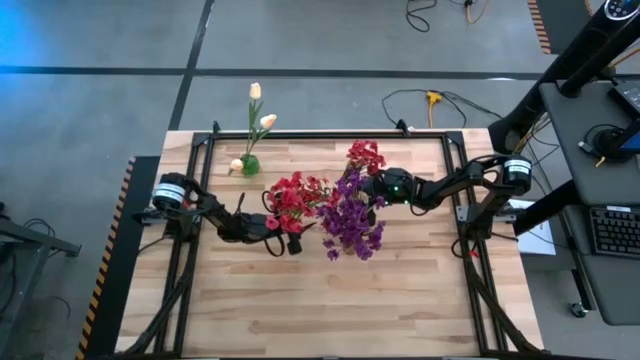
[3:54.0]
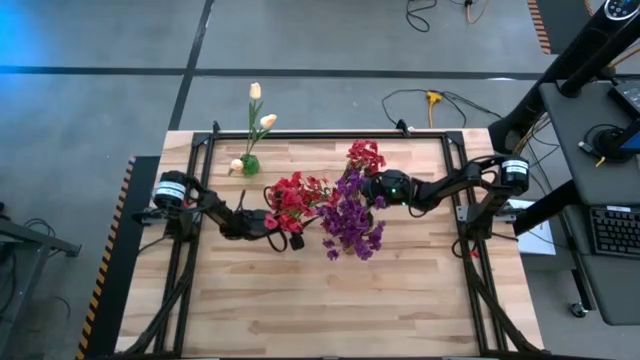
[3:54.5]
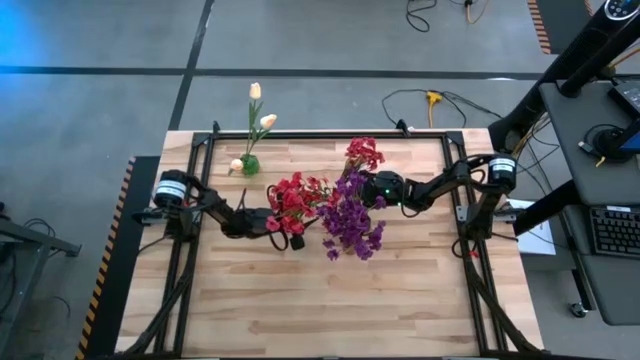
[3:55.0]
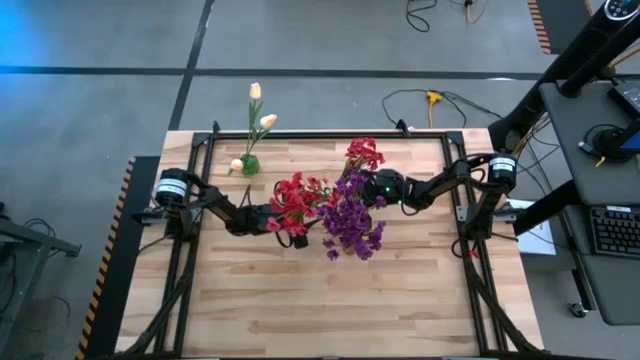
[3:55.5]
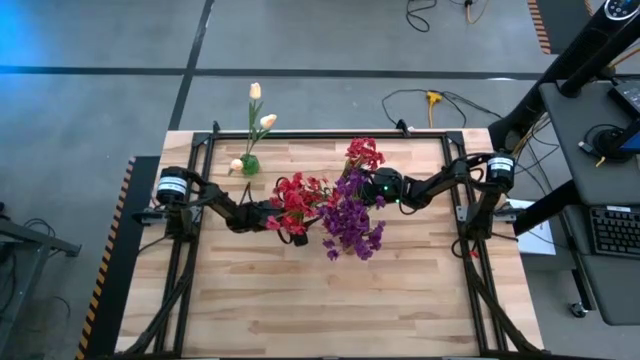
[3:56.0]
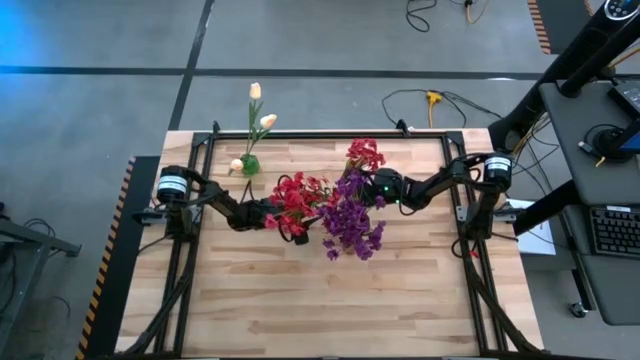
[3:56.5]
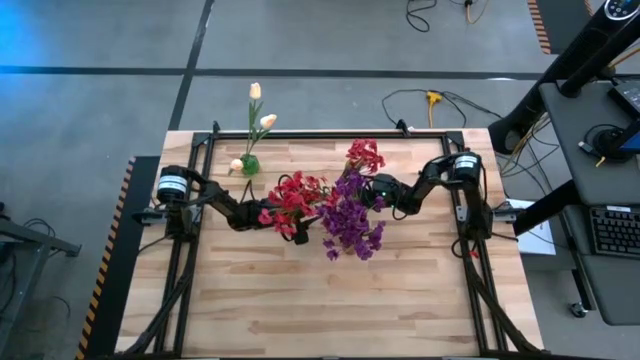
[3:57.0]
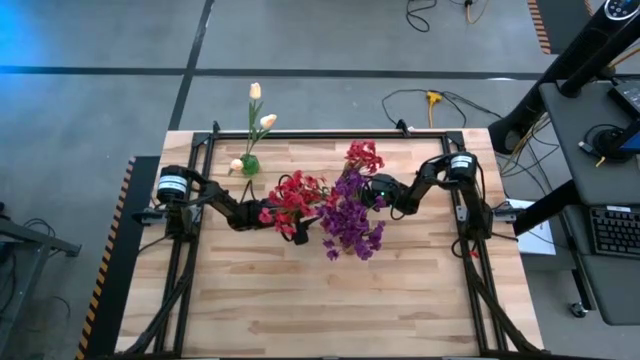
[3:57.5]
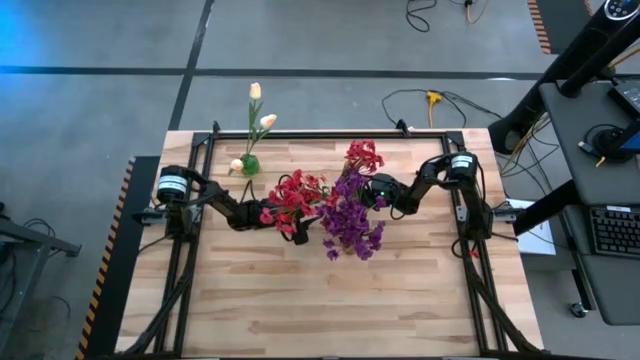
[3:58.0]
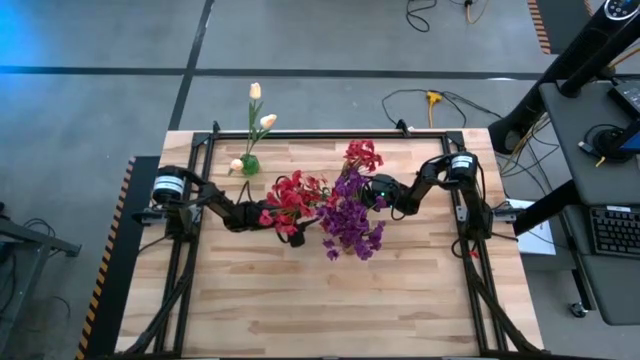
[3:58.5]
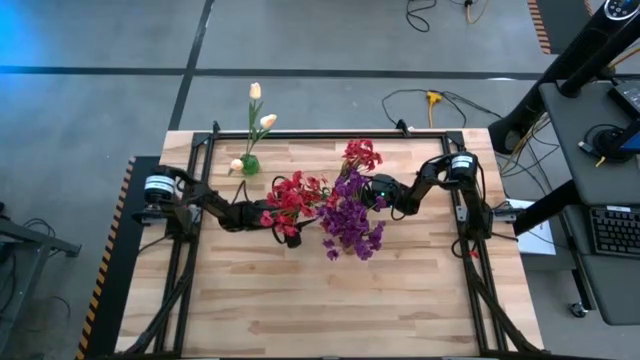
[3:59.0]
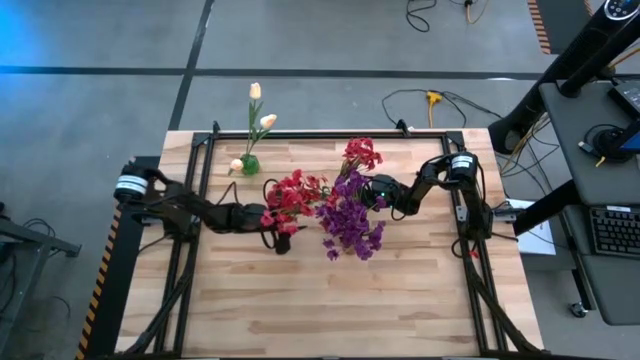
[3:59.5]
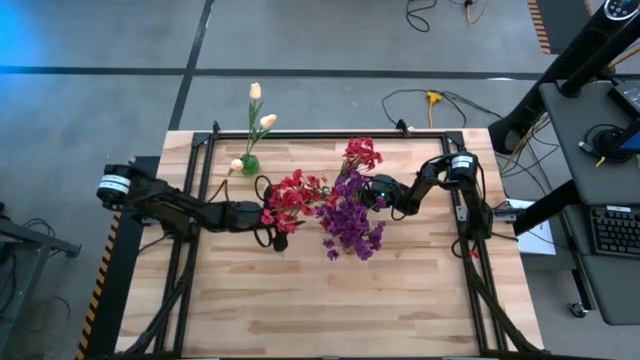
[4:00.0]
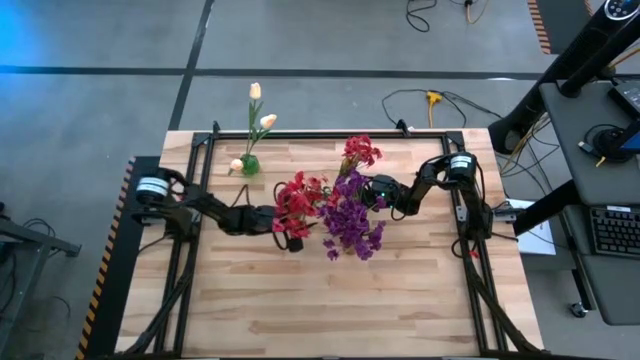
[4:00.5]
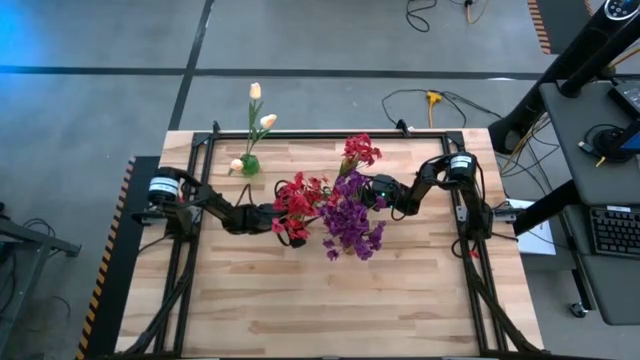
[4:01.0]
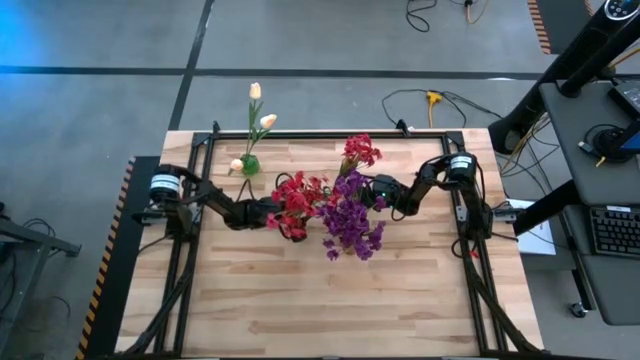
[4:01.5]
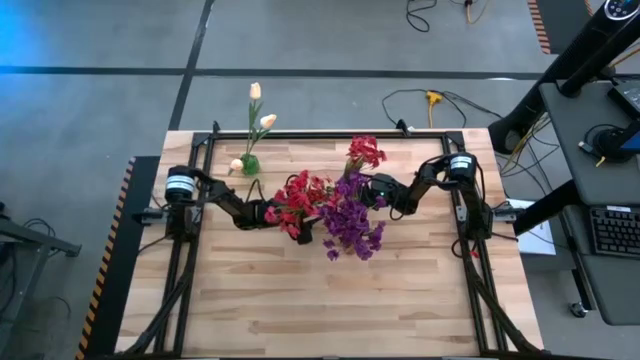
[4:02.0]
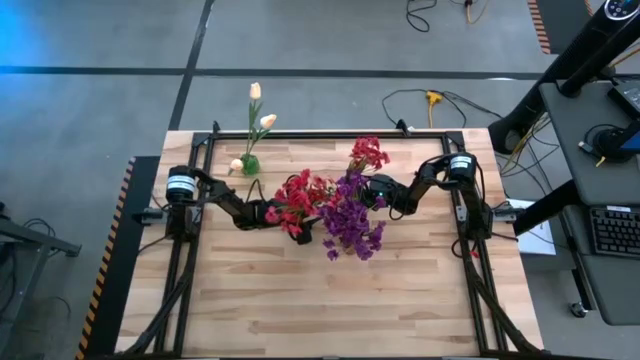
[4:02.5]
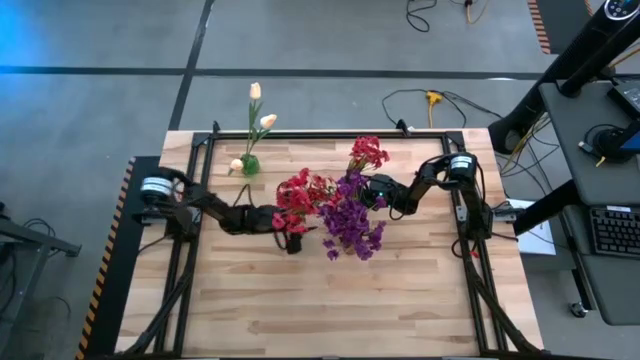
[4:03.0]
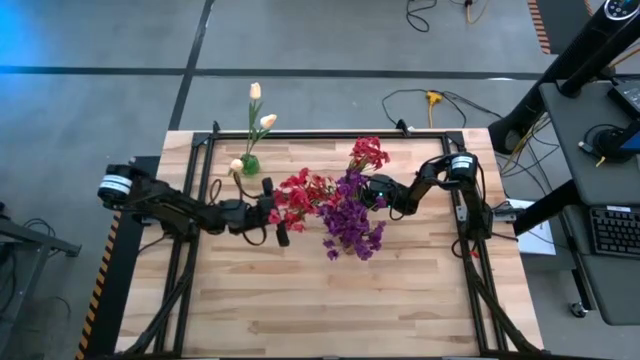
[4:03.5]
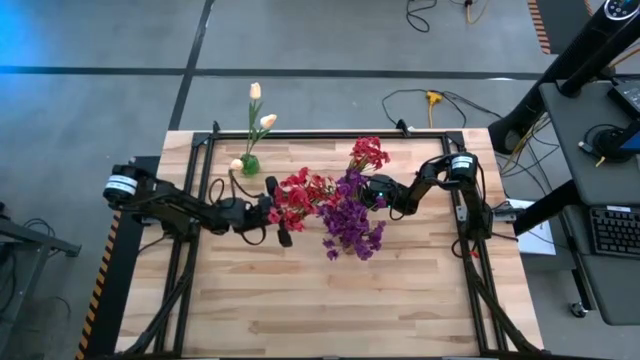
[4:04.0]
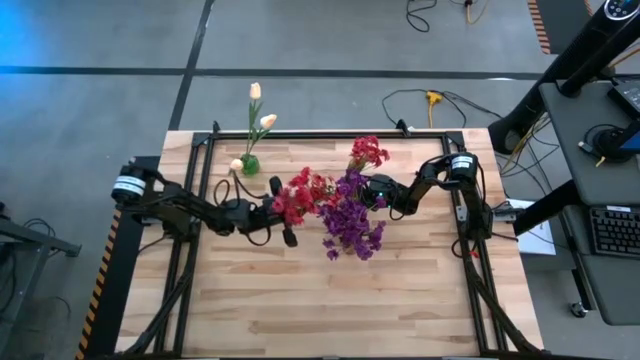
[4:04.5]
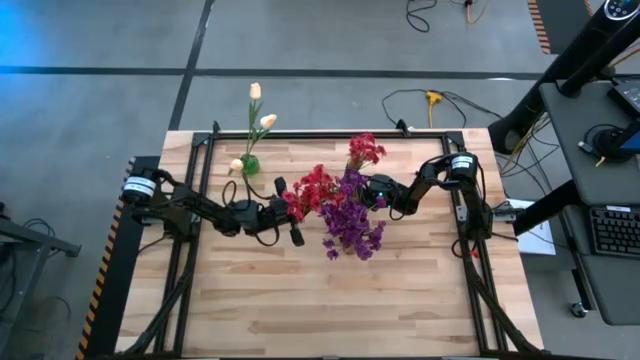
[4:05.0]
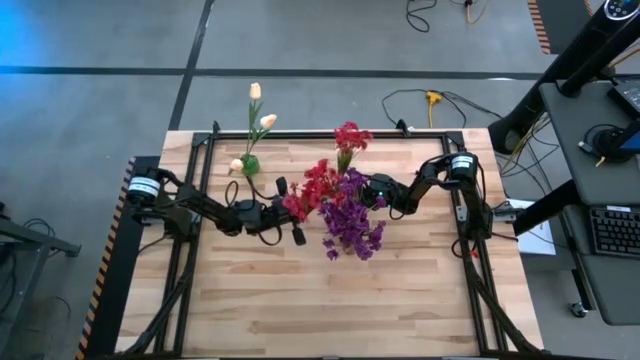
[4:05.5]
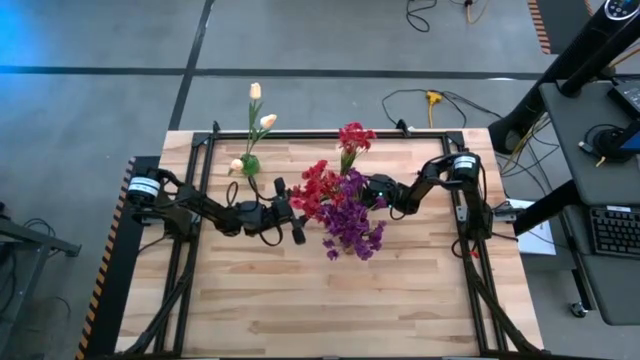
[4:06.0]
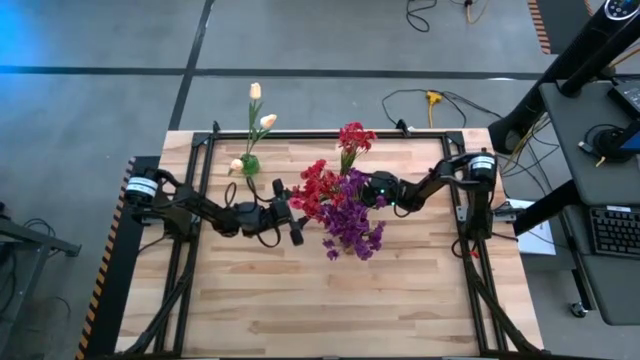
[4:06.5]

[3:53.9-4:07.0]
Task: Sort flowers into vase by color
Adjust the transparent vase

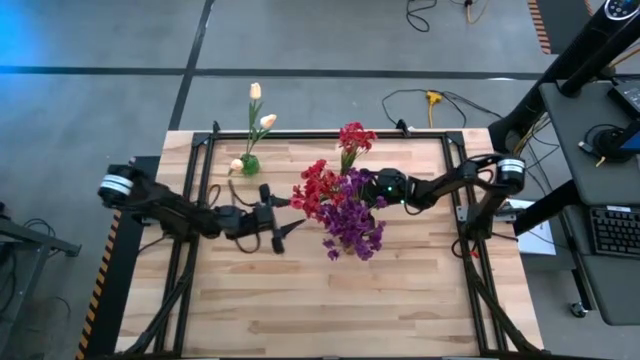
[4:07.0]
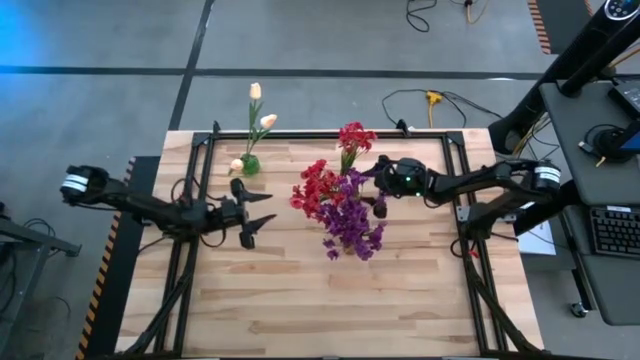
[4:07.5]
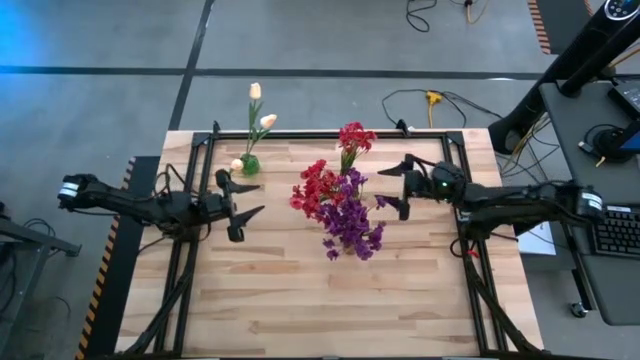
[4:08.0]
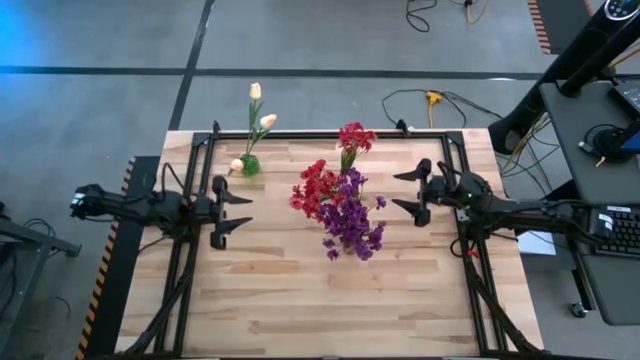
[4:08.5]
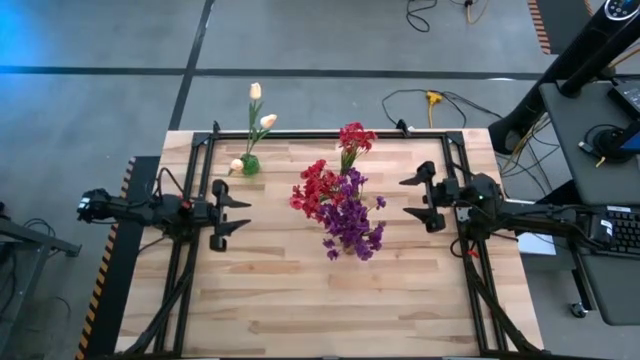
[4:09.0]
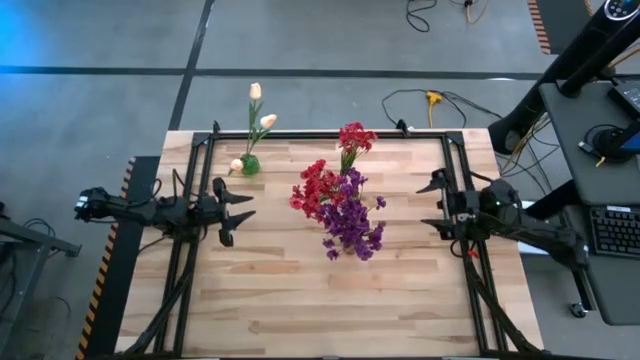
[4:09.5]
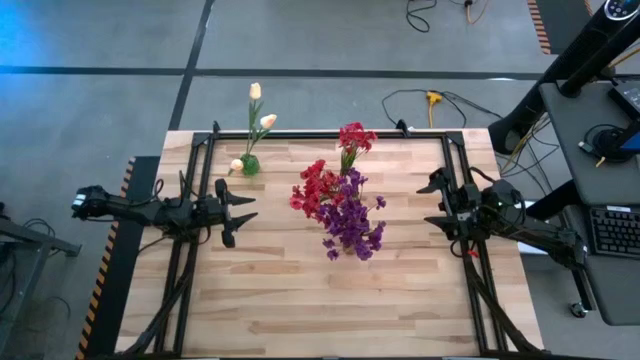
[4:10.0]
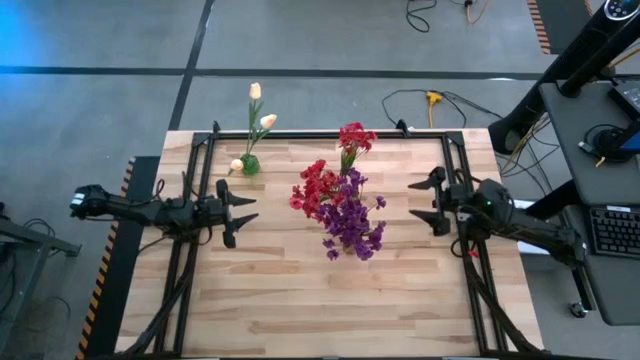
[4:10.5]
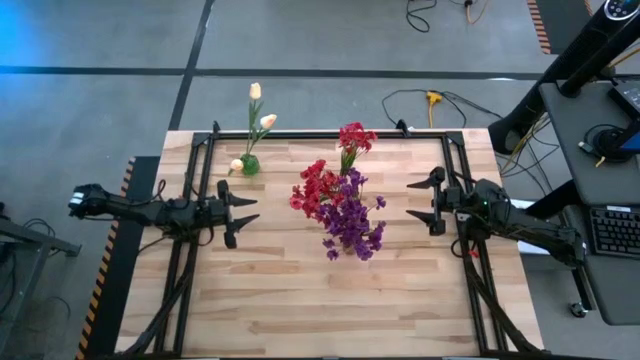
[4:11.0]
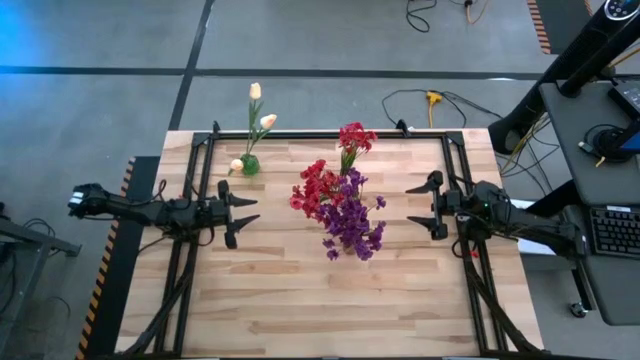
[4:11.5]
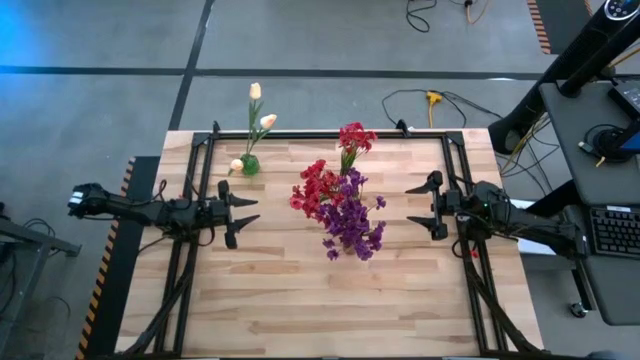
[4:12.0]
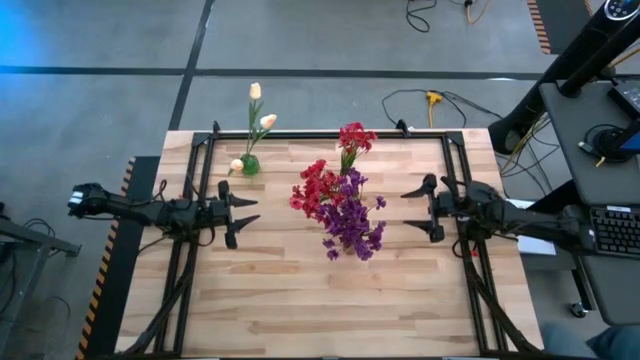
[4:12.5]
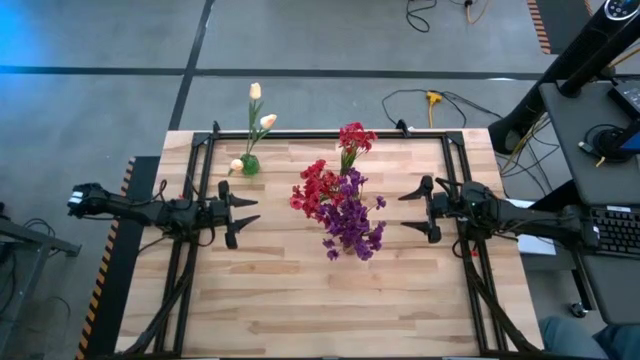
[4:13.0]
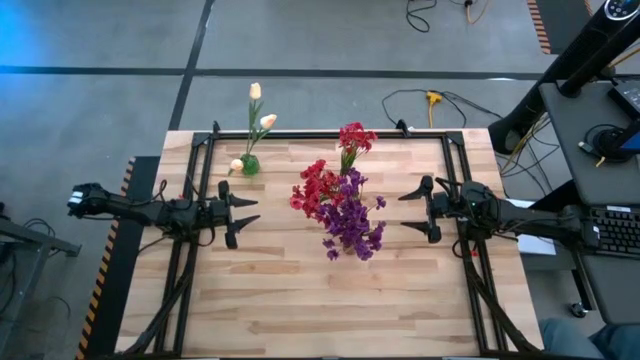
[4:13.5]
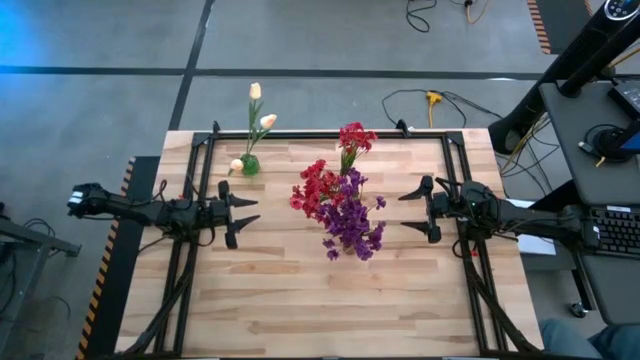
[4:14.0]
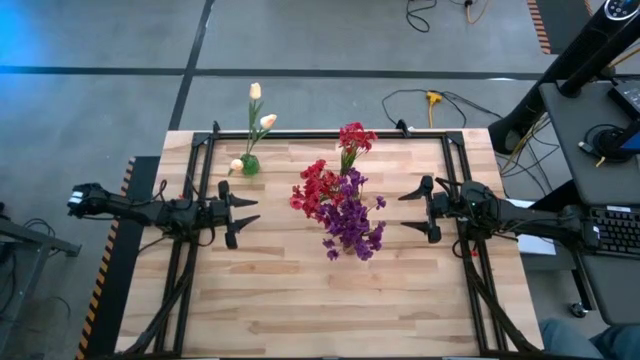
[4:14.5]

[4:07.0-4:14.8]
Return to Home Position
